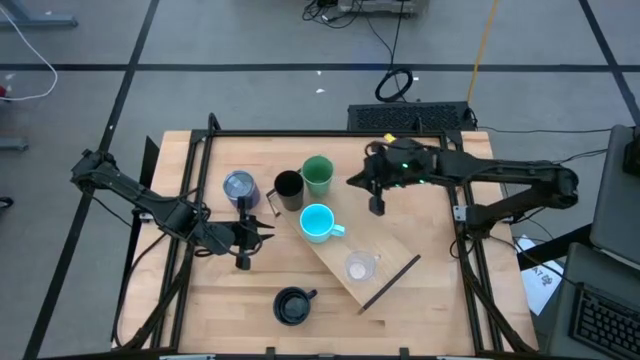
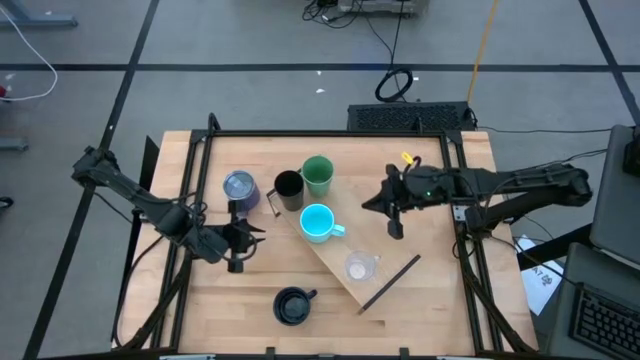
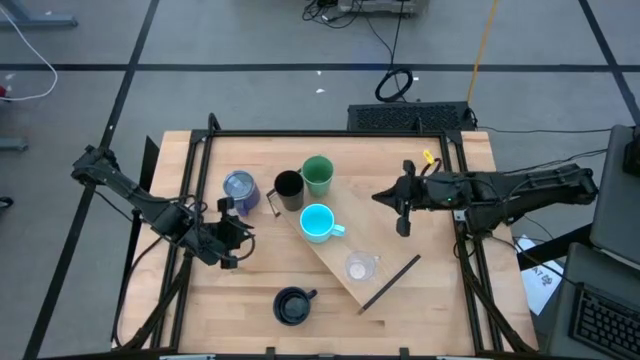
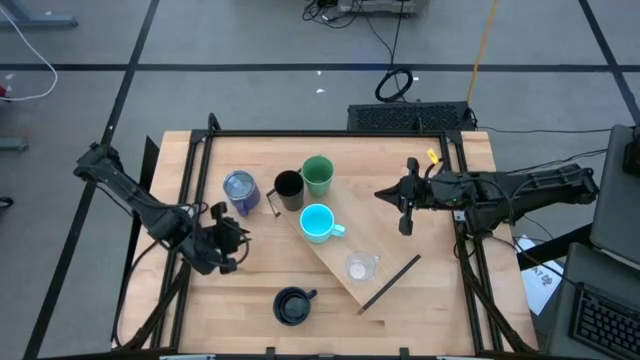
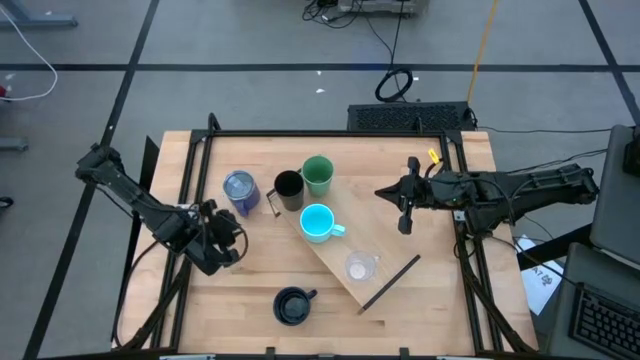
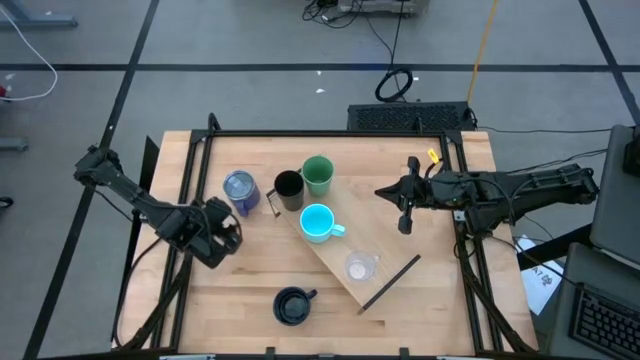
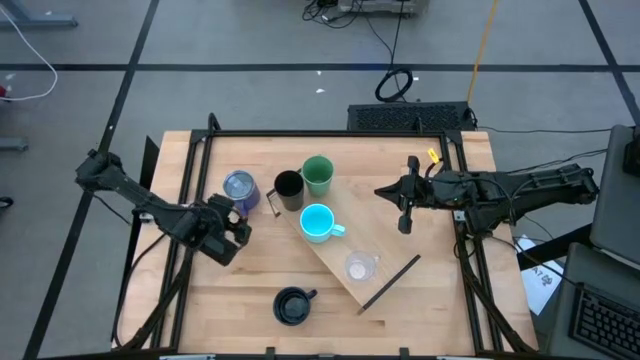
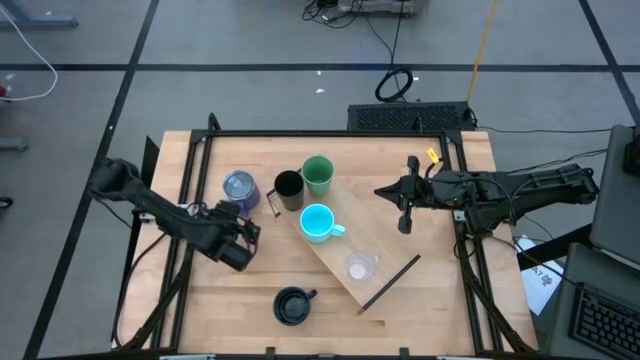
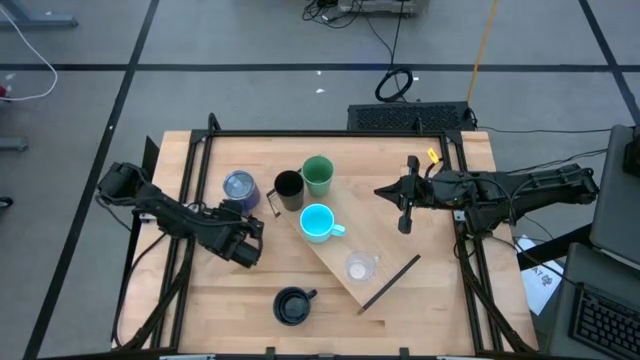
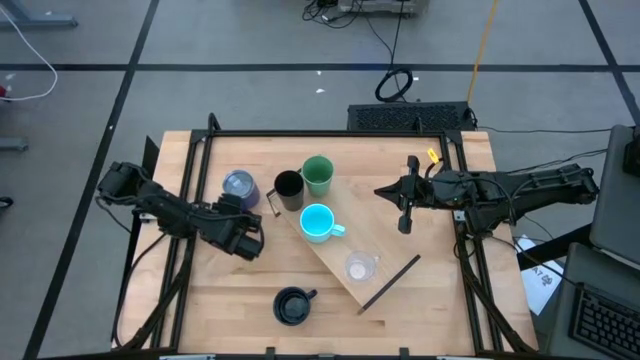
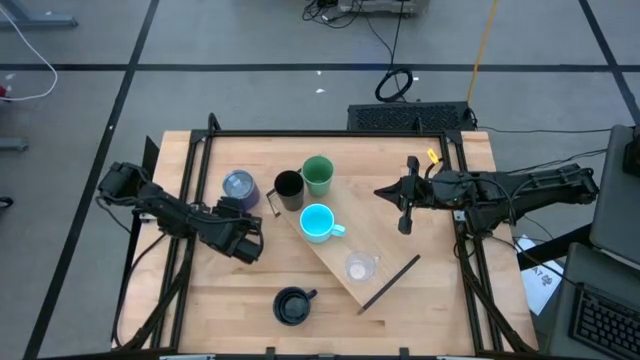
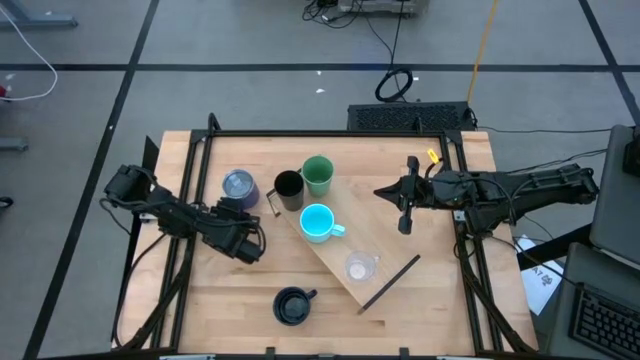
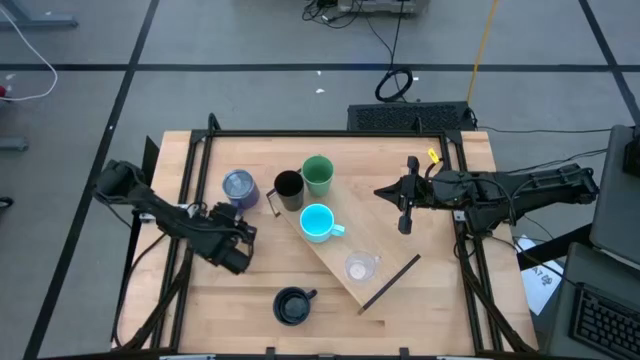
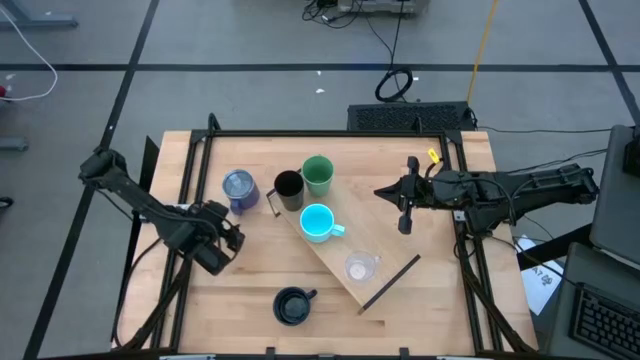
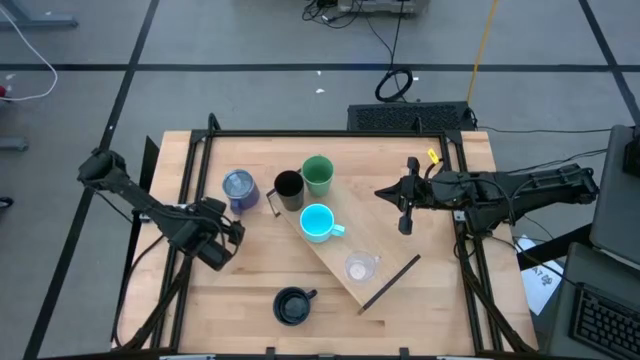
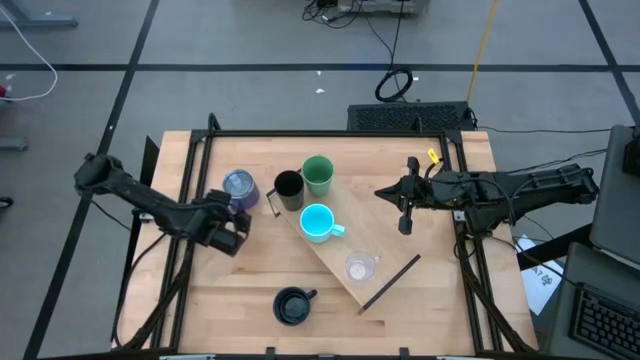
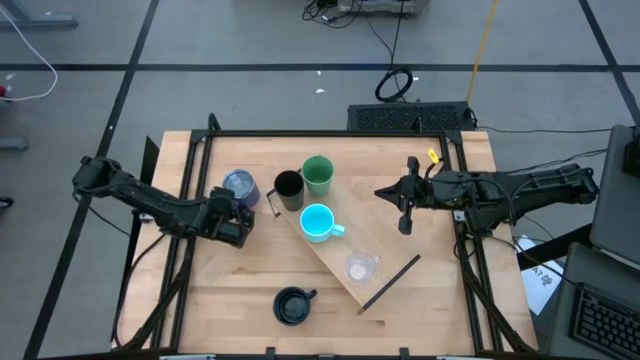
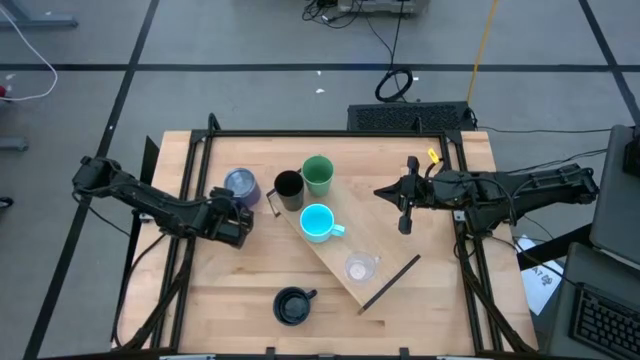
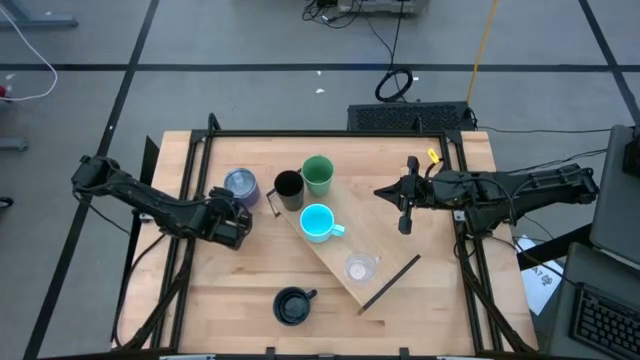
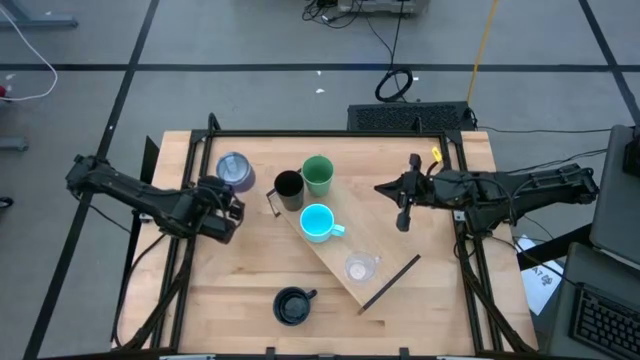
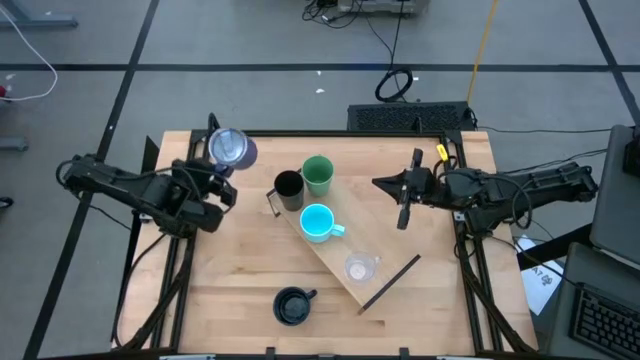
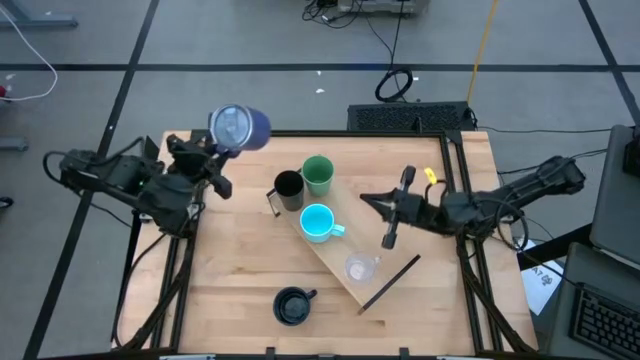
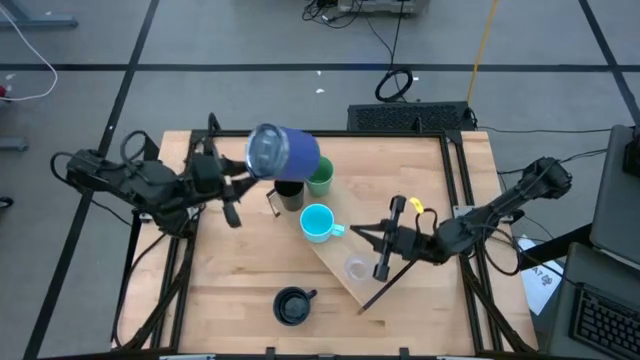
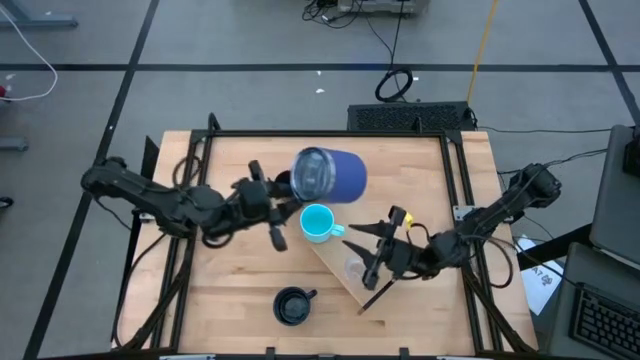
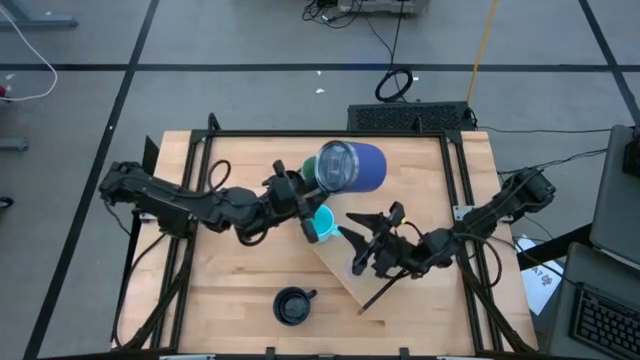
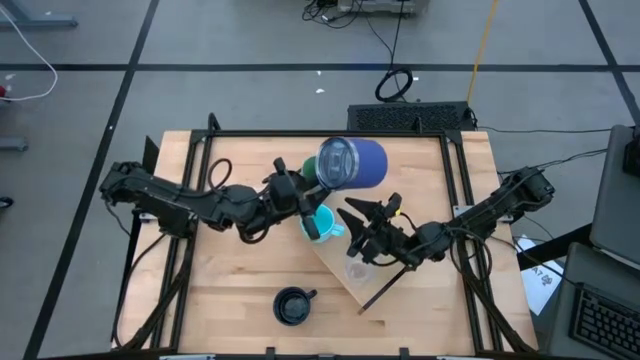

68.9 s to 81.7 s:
Task: Stack small to large cups/mugs on shelf
Put the purple mug on the shelf

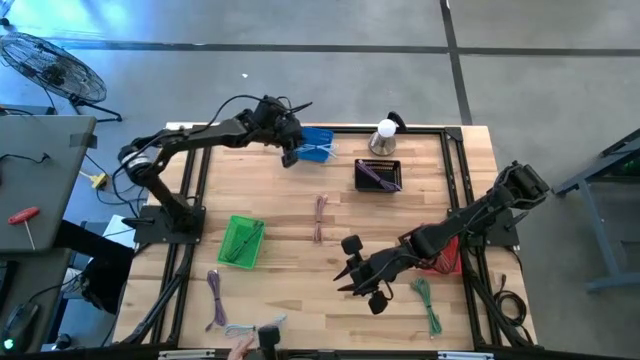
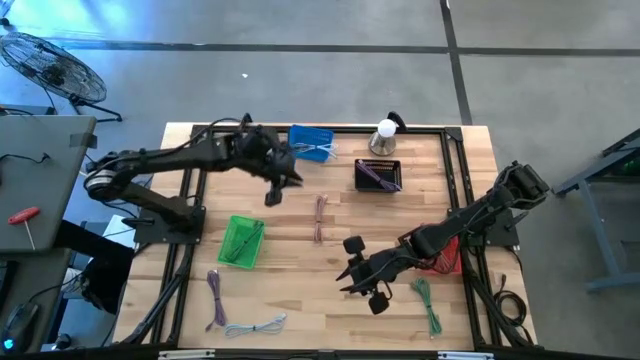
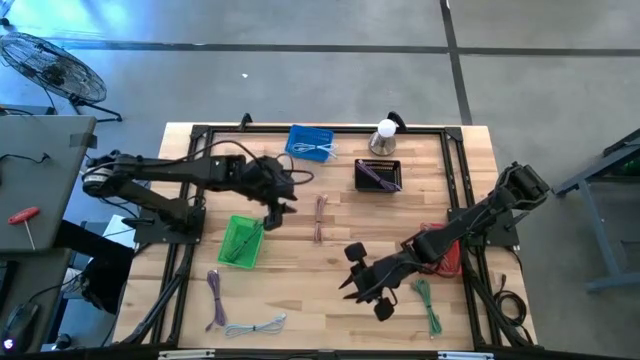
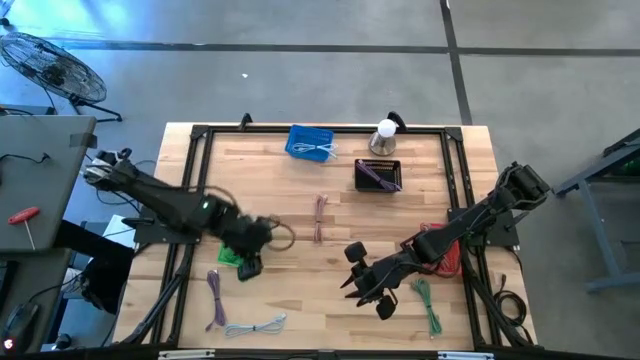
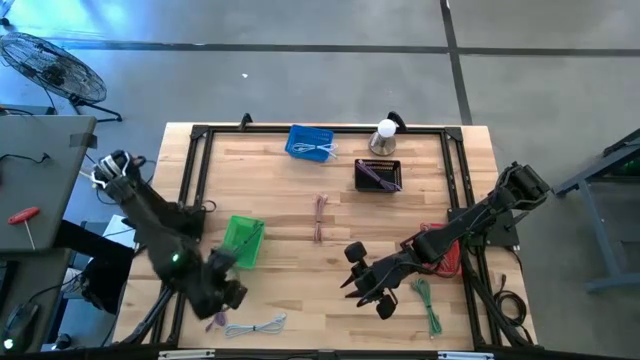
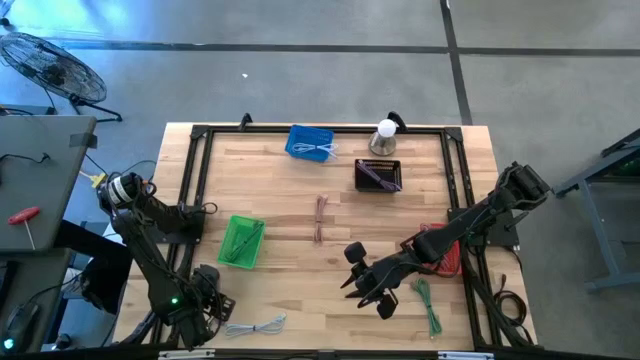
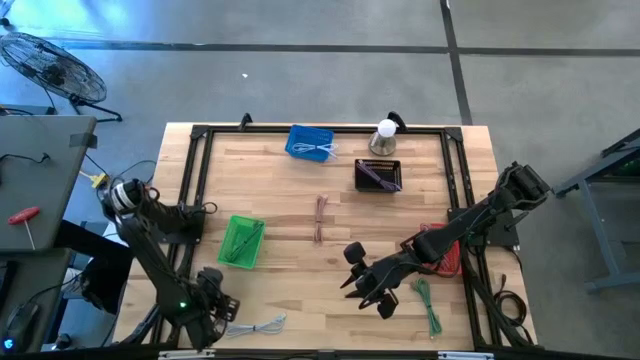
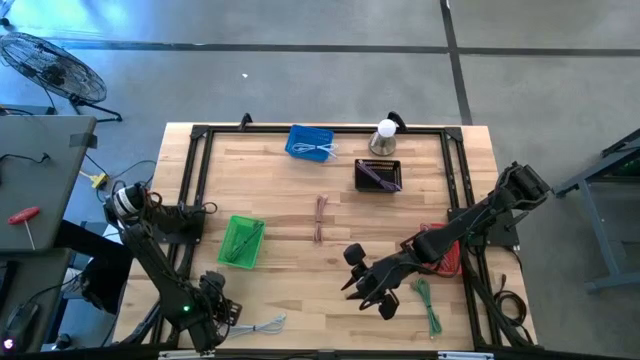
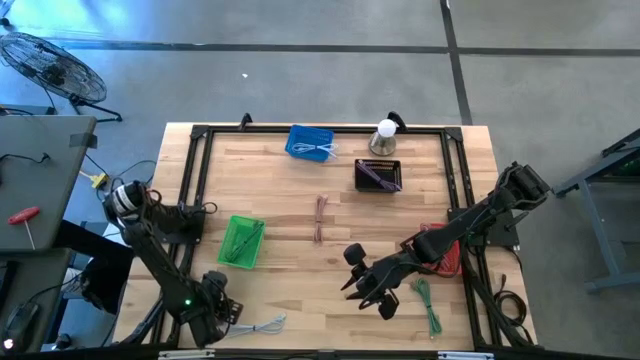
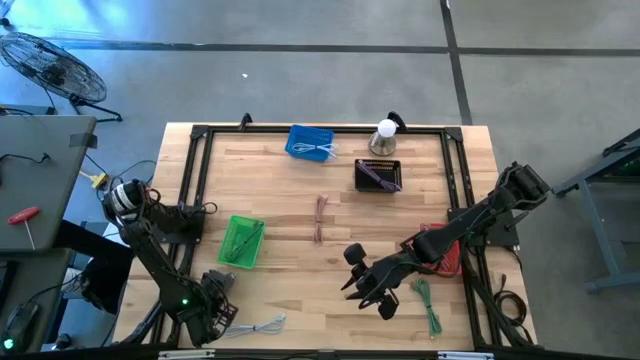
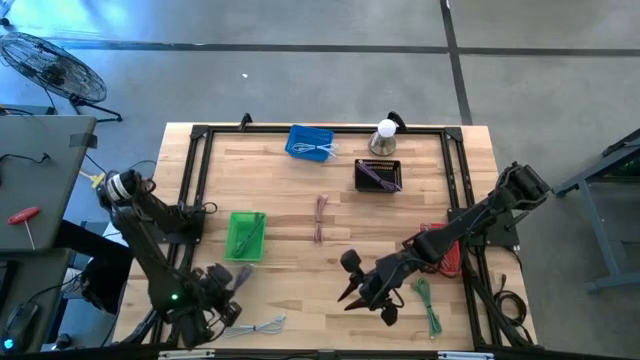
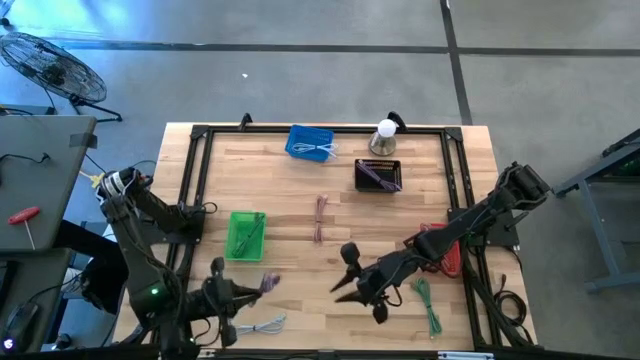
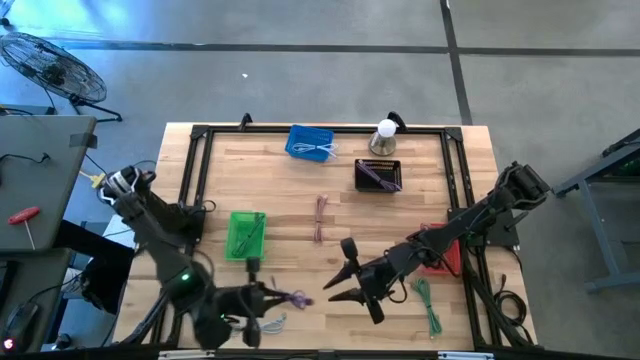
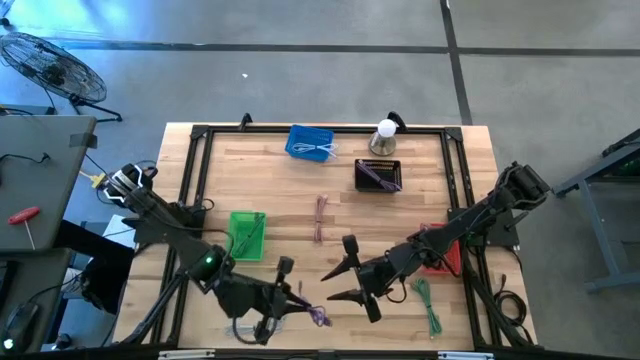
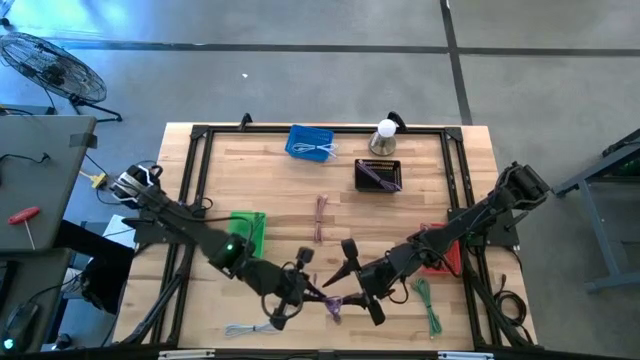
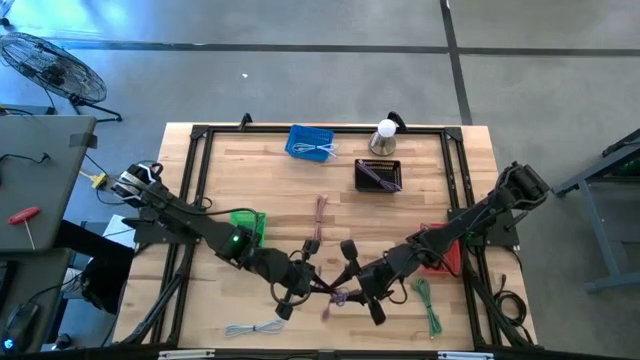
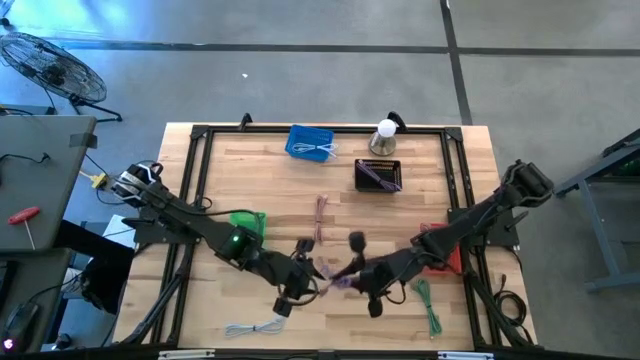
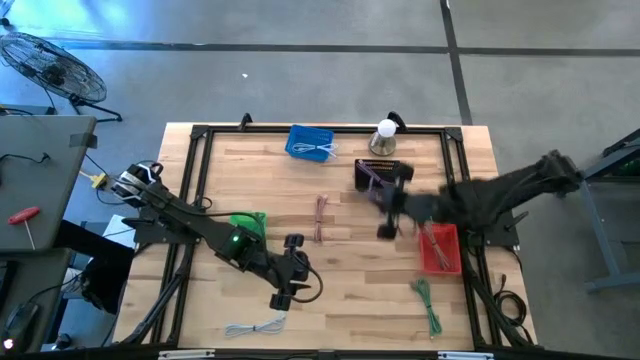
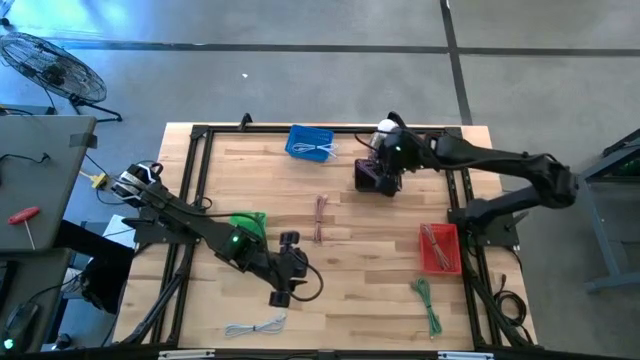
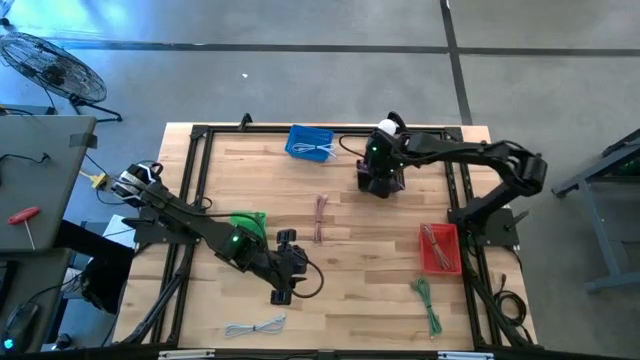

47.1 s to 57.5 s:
Task: Pick & Place USB Port
Put the violet charger cable into the black bin
